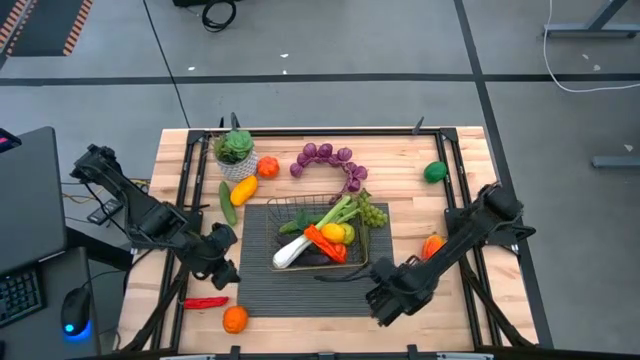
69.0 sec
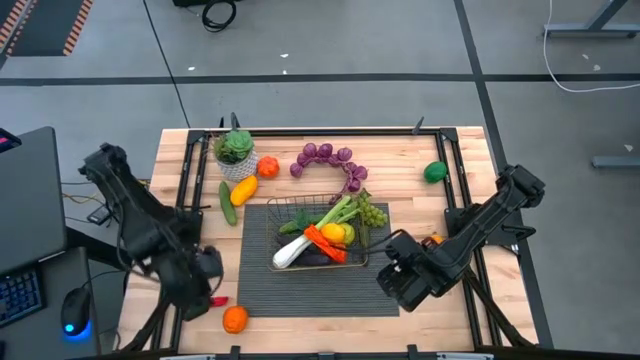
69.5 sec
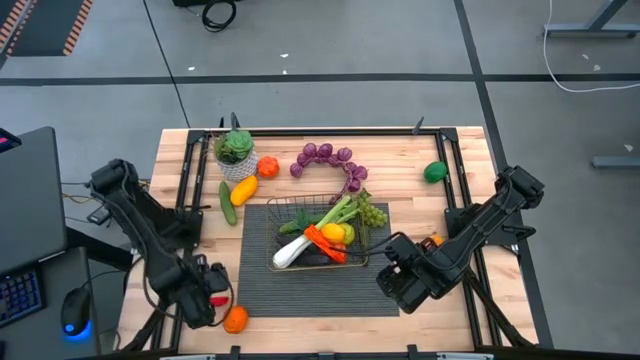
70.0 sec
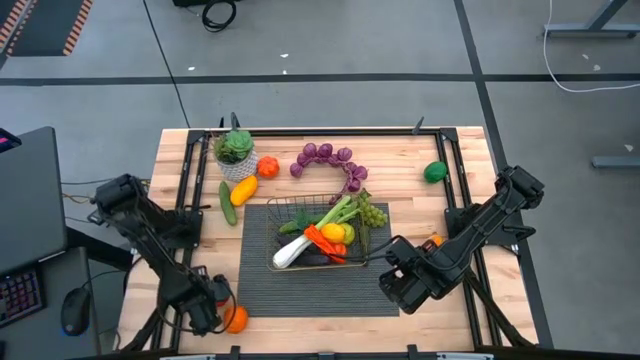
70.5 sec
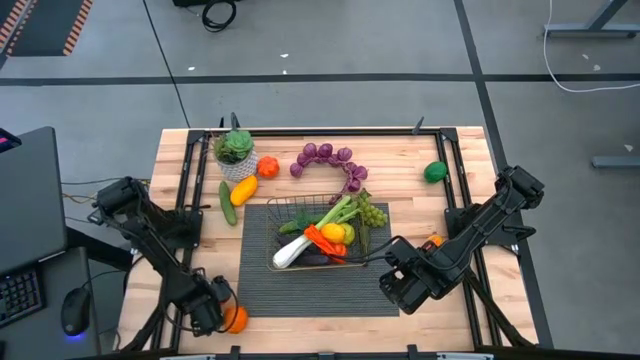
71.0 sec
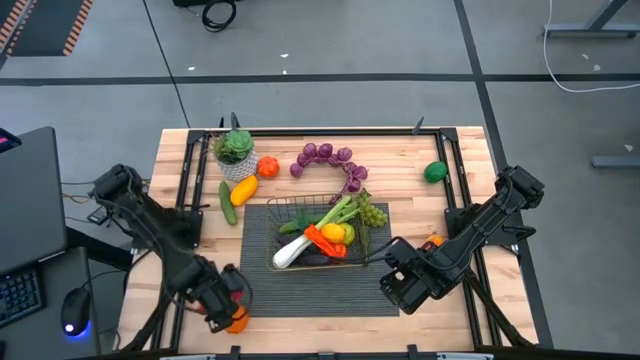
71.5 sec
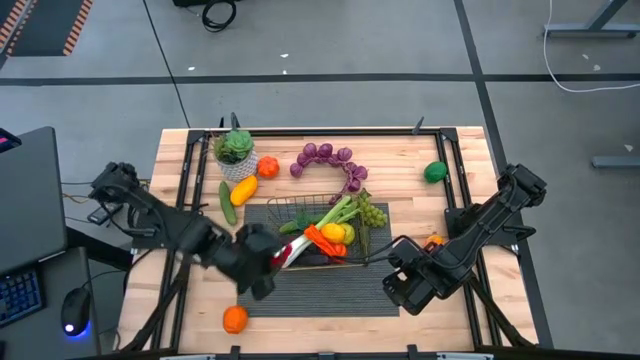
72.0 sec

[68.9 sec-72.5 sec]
Task: Build produce basket
Put the red chili pepper into the gold wire basket

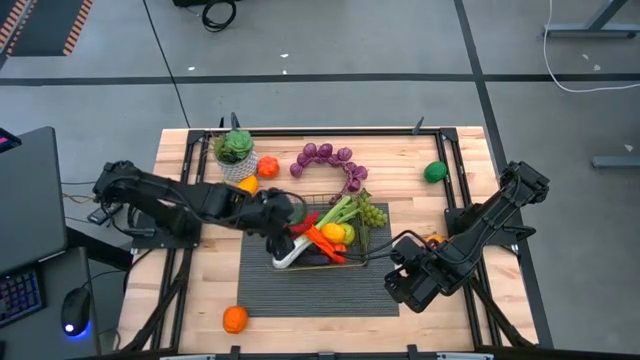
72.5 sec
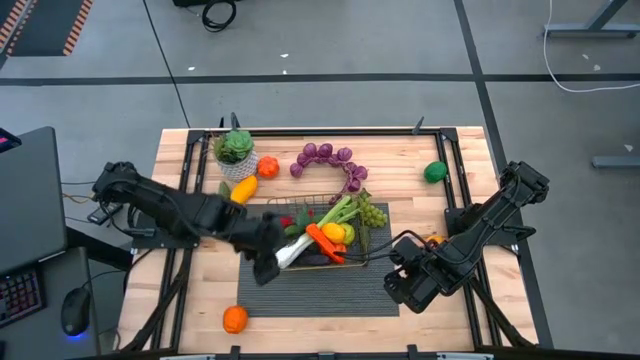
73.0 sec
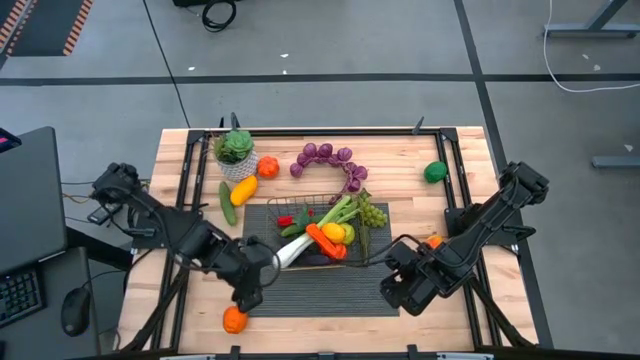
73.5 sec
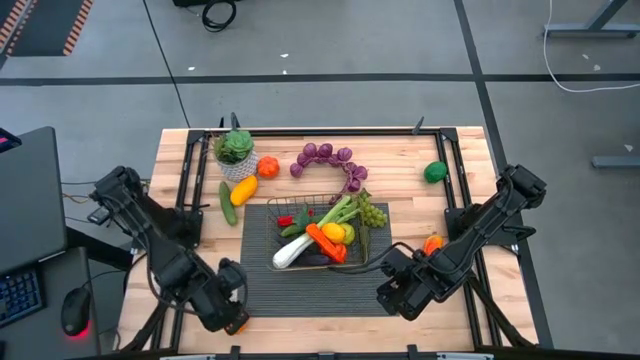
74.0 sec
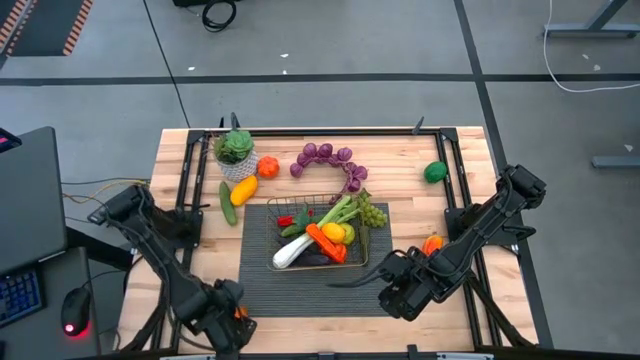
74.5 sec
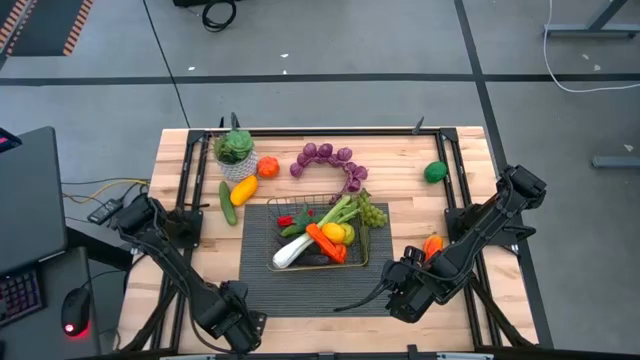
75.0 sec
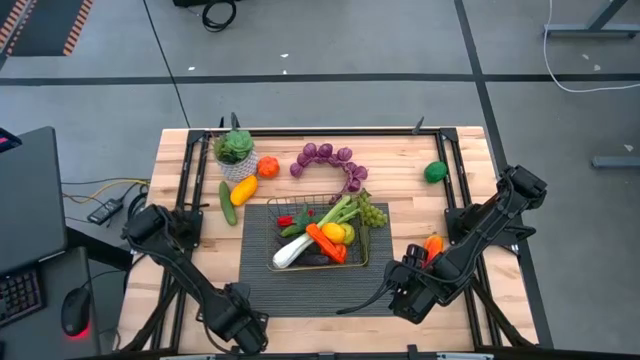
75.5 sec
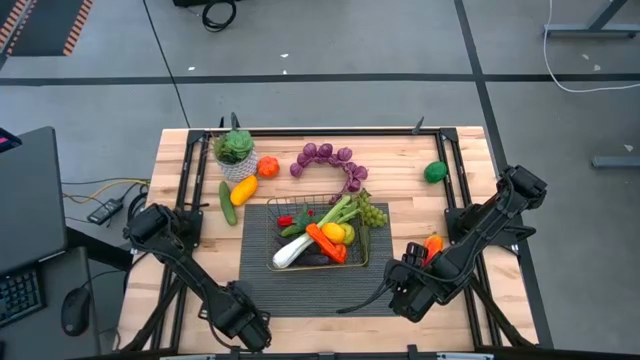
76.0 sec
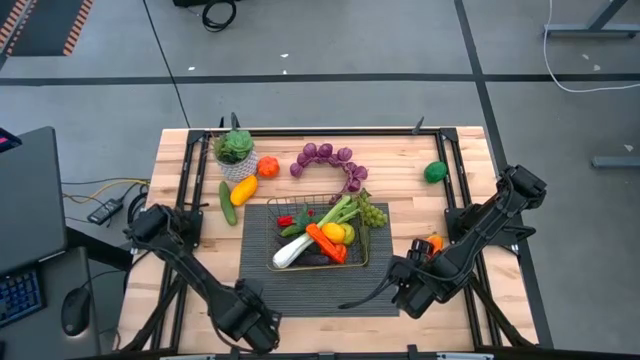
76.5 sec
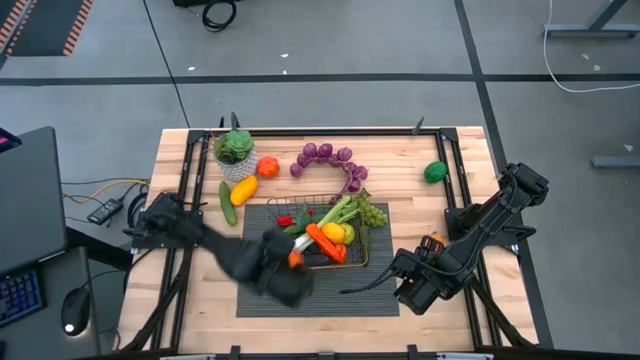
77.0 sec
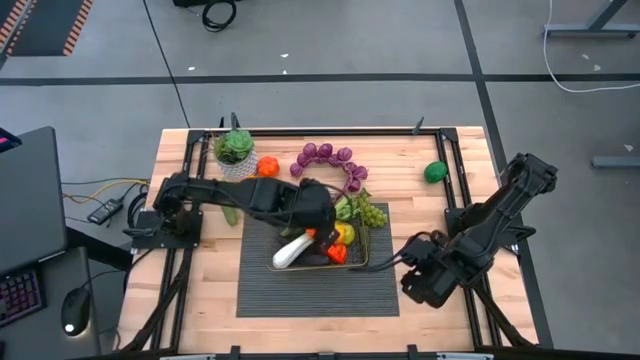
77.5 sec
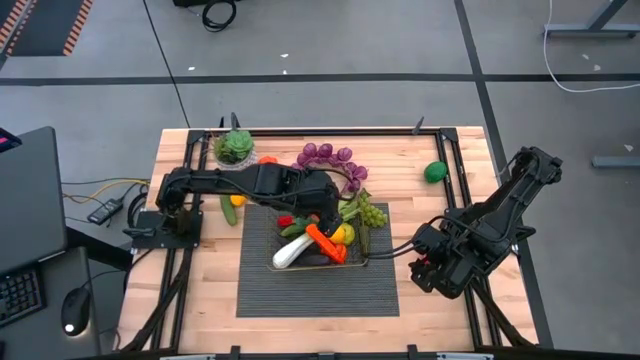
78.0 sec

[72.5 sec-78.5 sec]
Put the orange into the gold wire basket

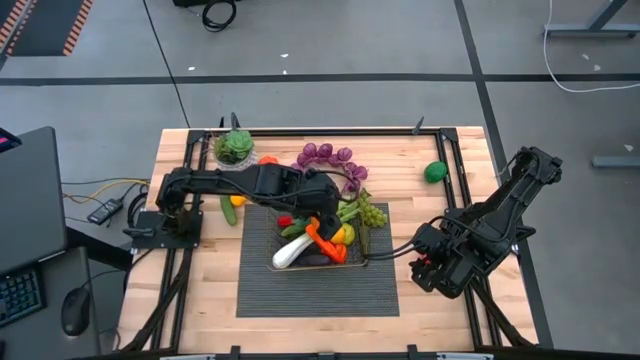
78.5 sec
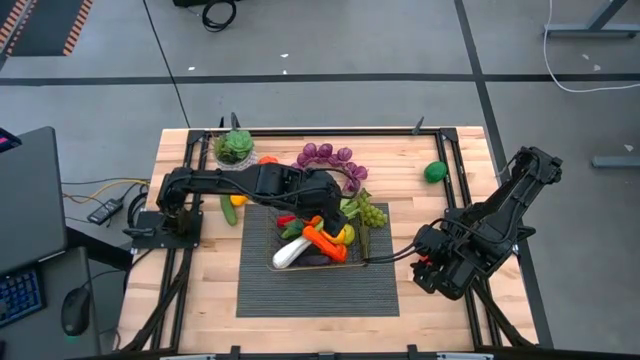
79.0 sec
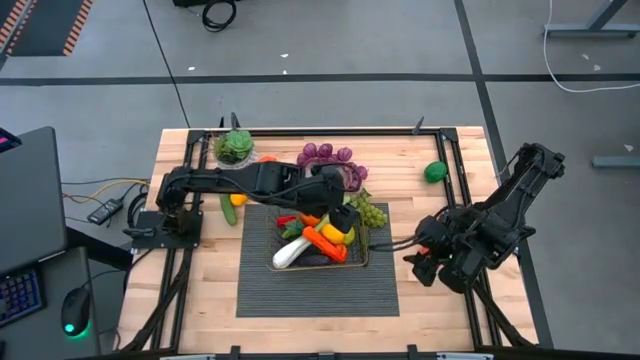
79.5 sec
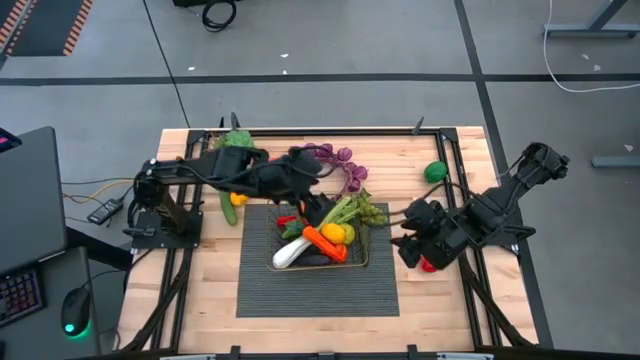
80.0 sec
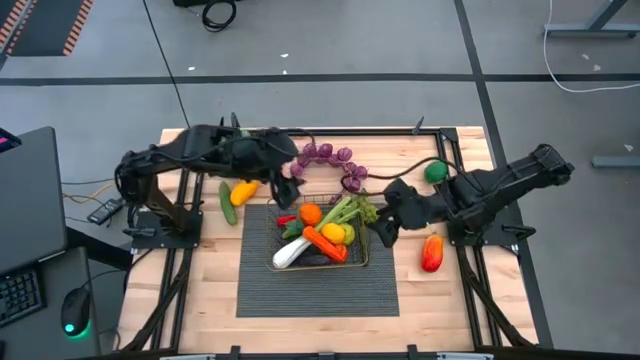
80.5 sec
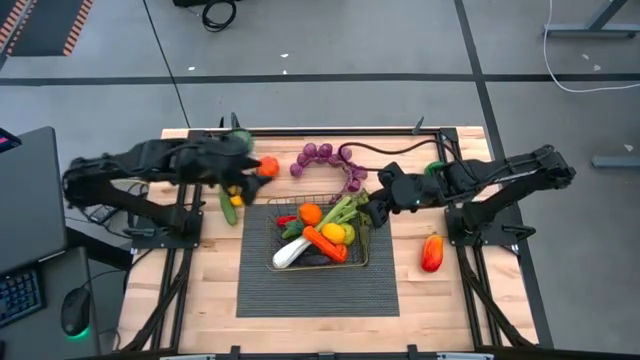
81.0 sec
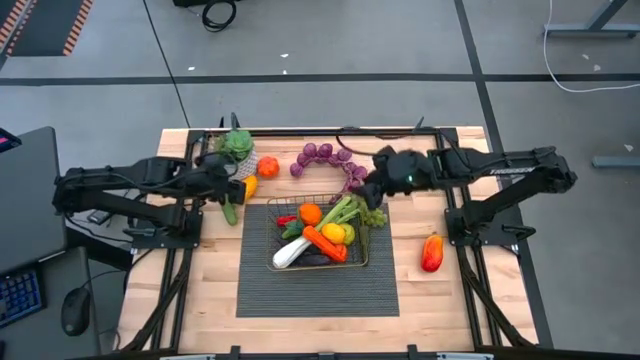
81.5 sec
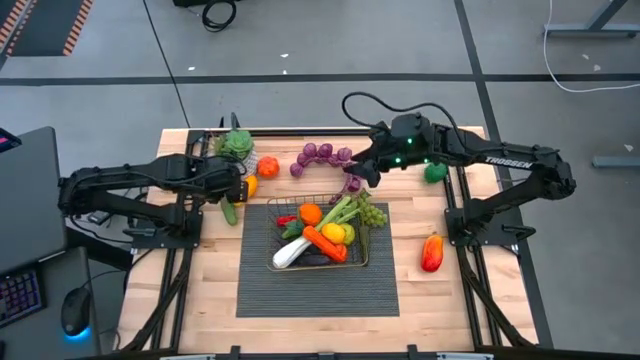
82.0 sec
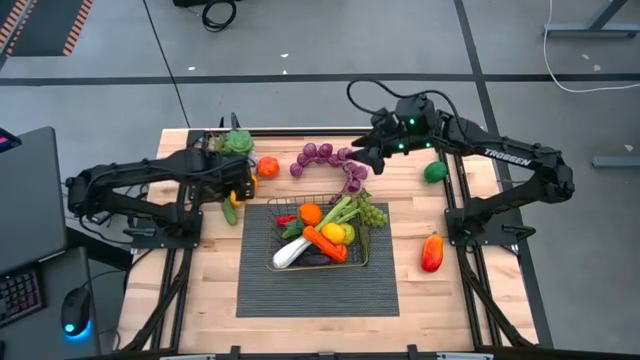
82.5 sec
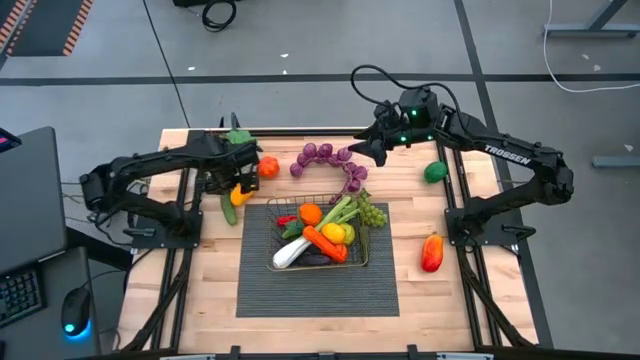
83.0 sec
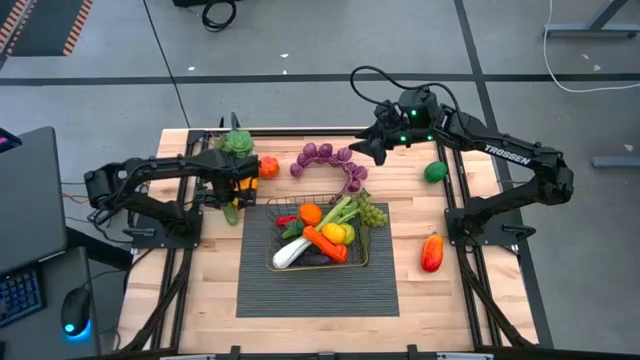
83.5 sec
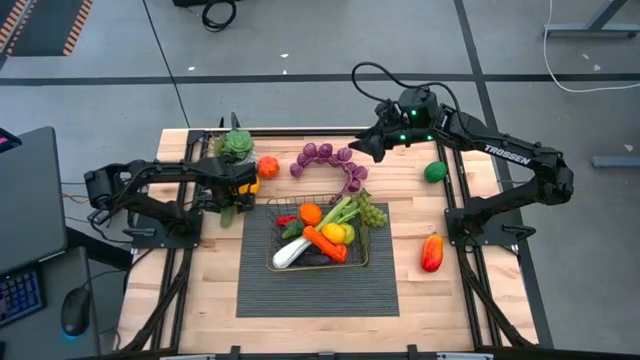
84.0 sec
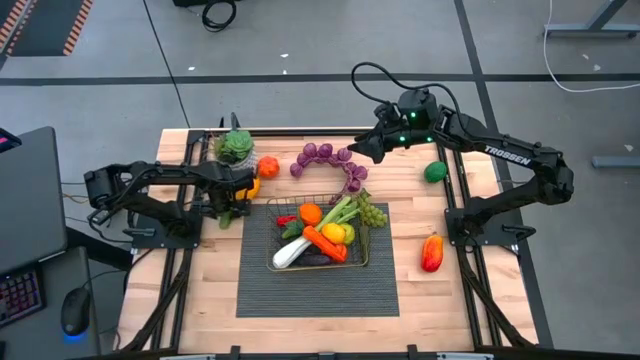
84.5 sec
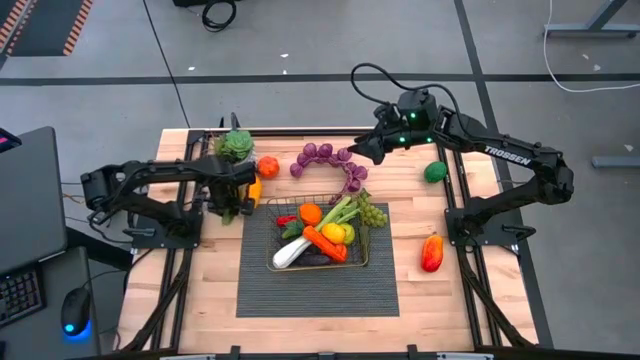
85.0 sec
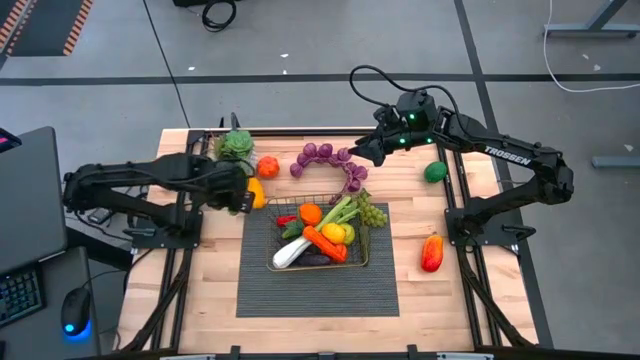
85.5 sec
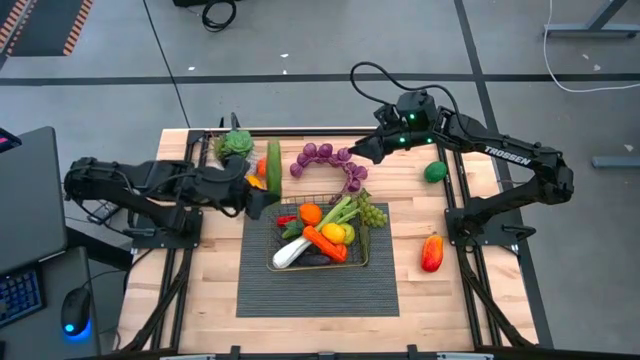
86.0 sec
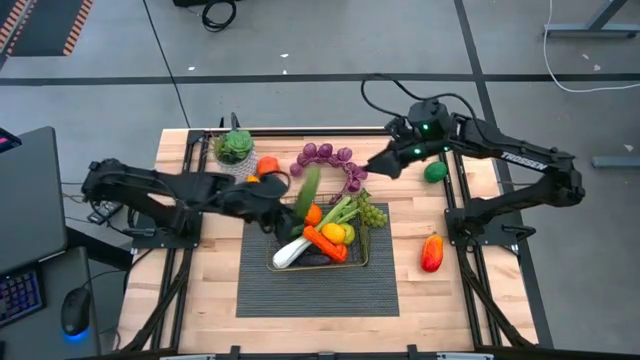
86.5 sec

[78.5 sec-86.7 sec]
Put the green cucumber into the gold wire basket

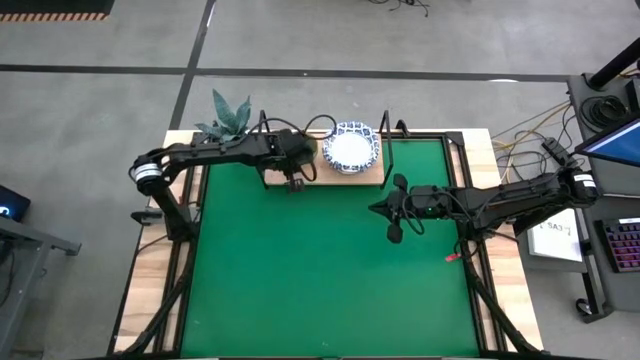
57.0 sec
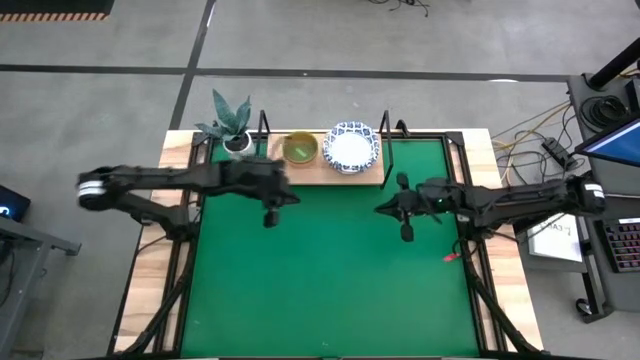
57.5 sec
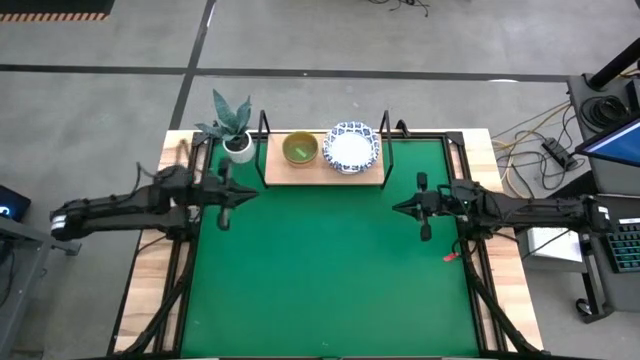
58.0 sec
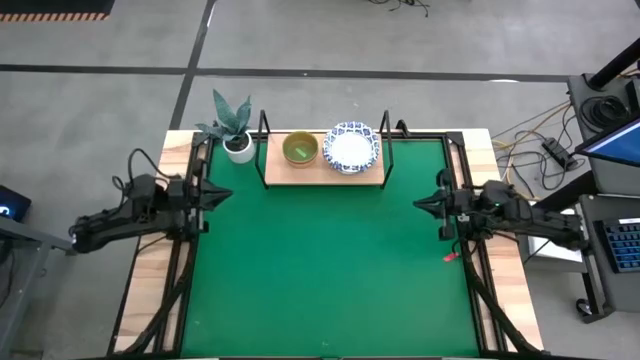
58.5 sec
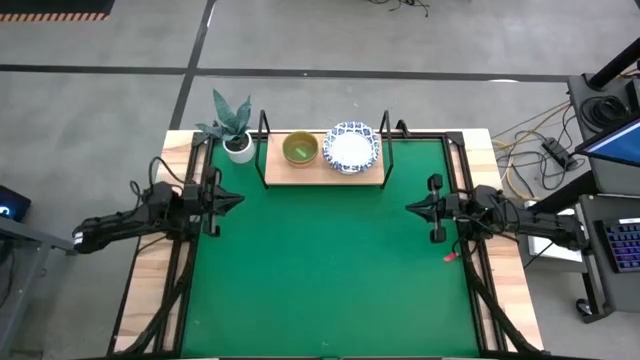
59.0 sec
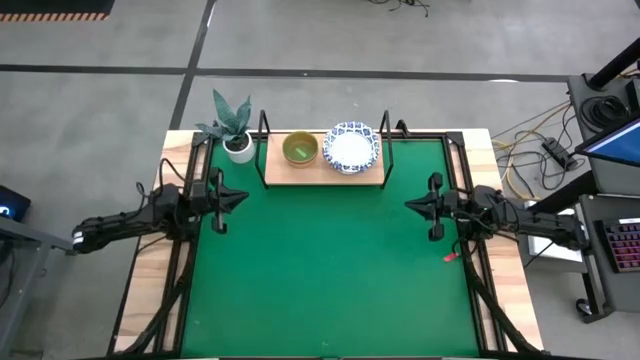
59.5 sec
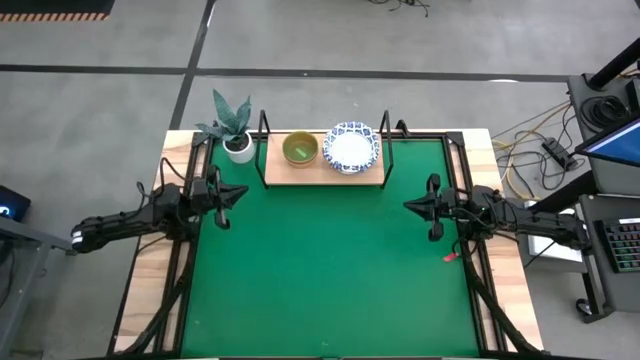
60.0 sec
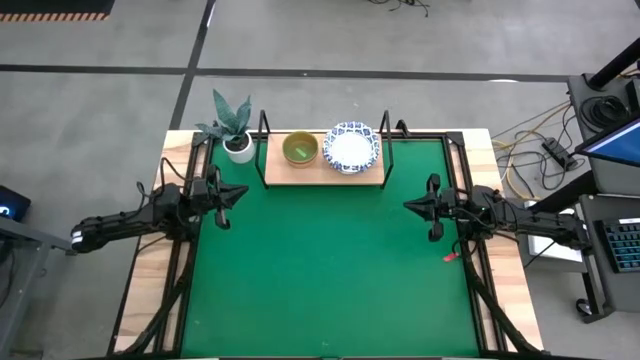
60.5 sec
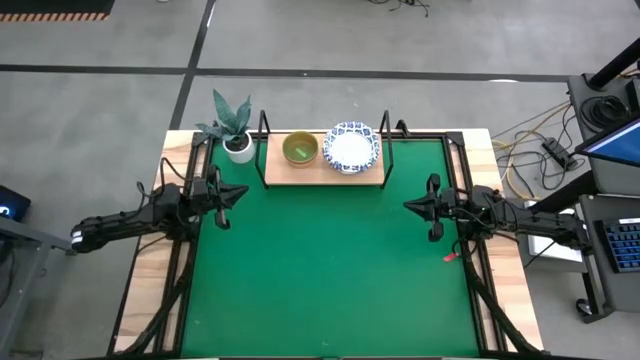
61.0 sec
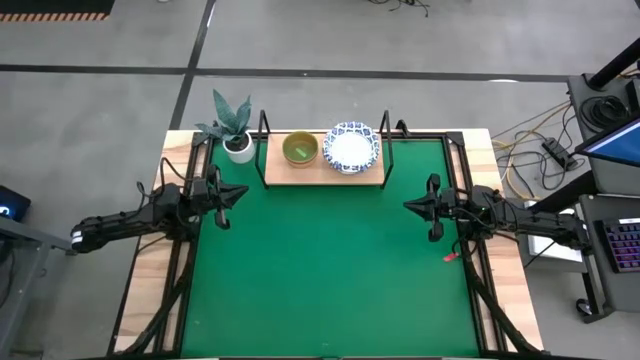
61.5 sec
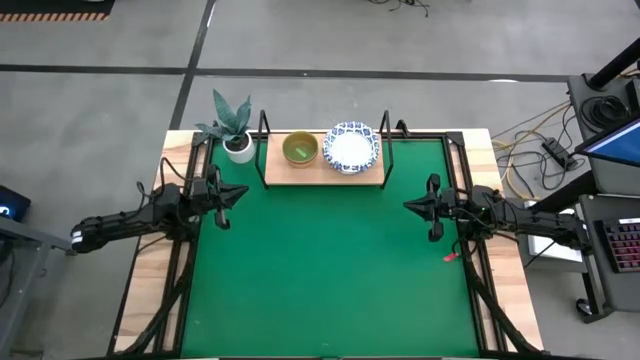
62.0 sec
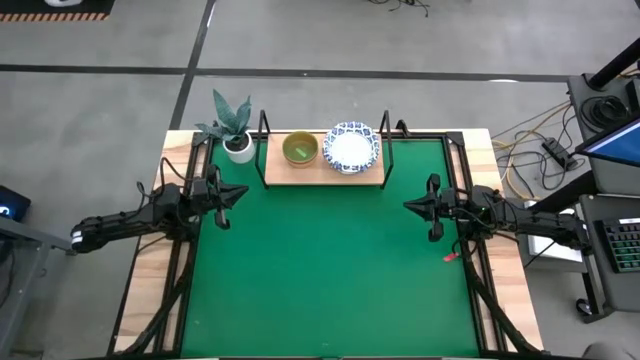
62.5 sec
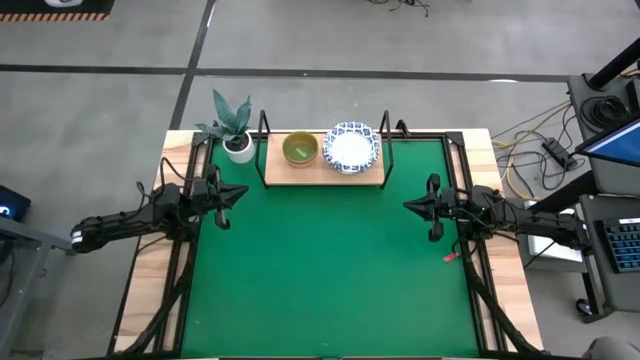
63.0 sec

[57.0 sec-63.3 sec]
Task: Place and stack bowls onto a shelf
Return to Home Position
